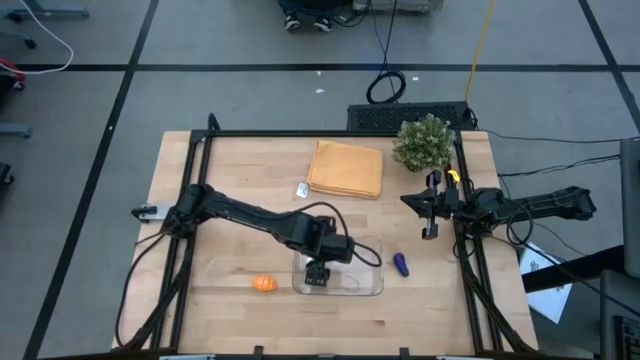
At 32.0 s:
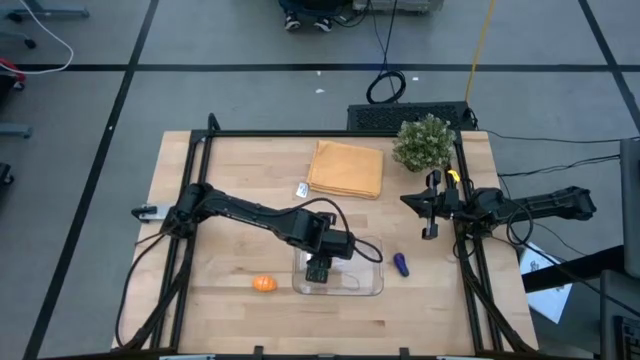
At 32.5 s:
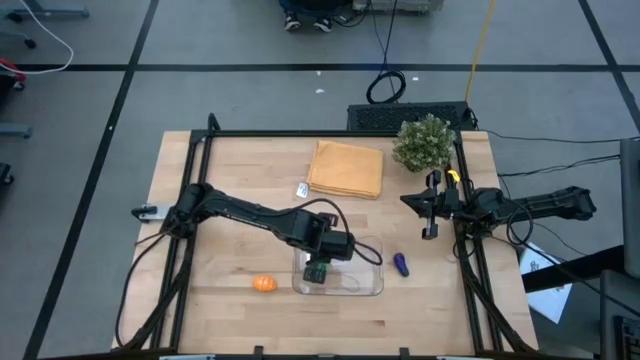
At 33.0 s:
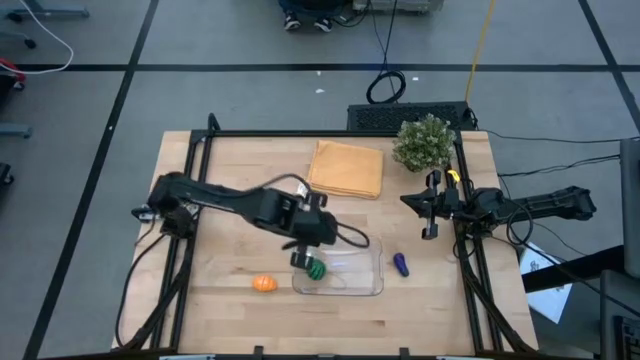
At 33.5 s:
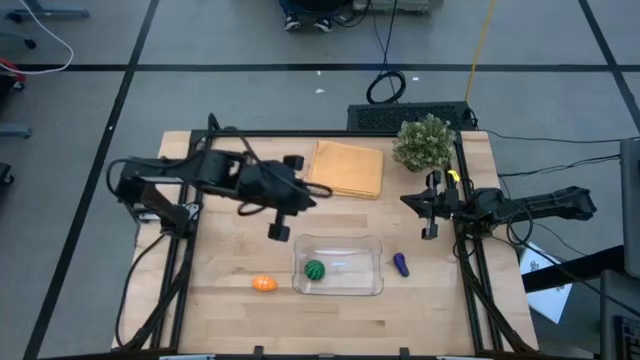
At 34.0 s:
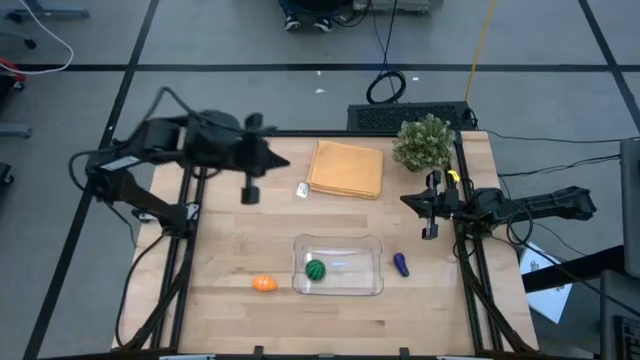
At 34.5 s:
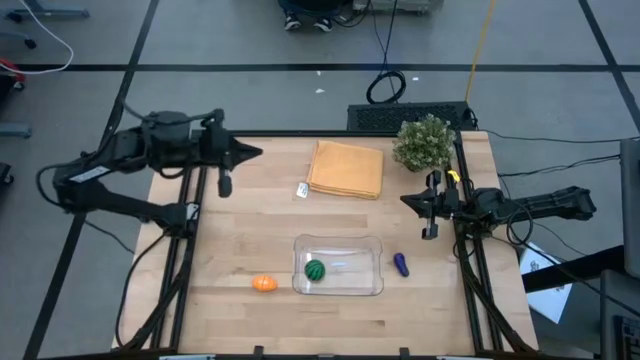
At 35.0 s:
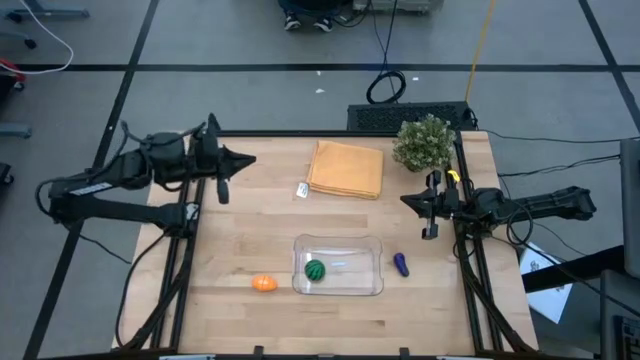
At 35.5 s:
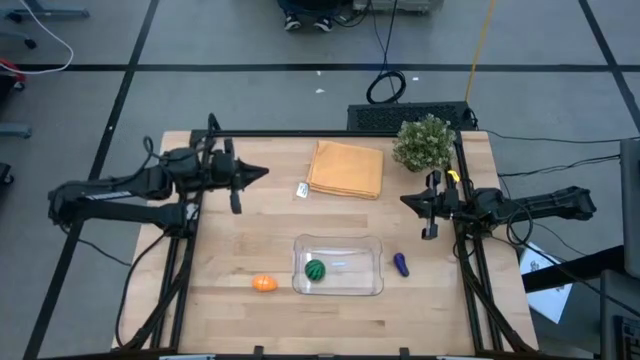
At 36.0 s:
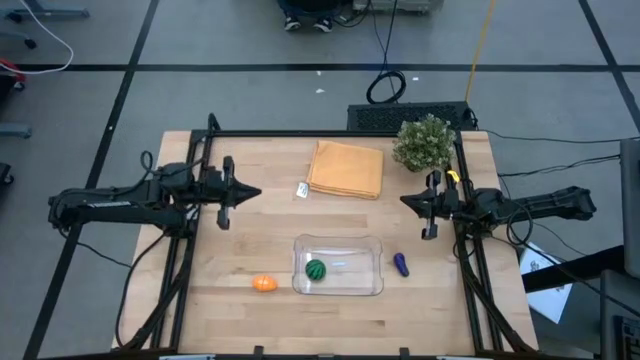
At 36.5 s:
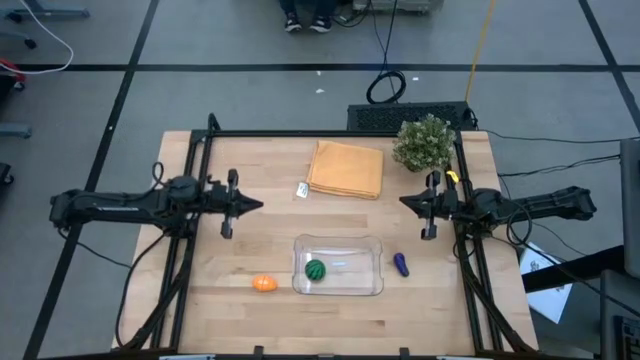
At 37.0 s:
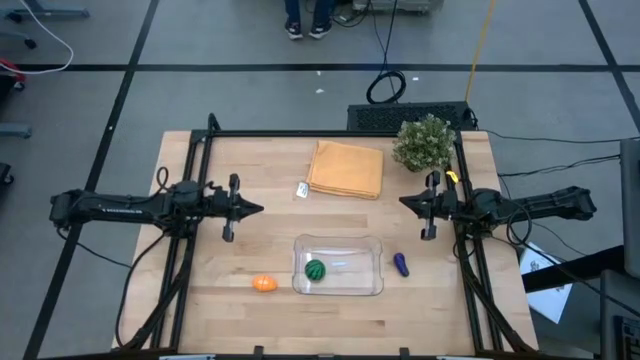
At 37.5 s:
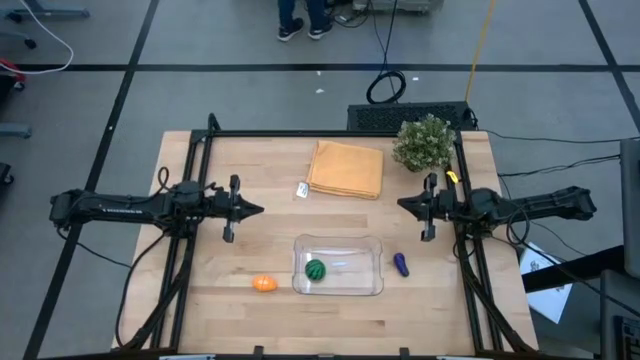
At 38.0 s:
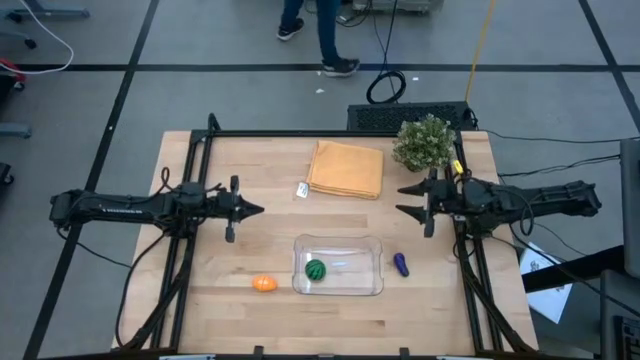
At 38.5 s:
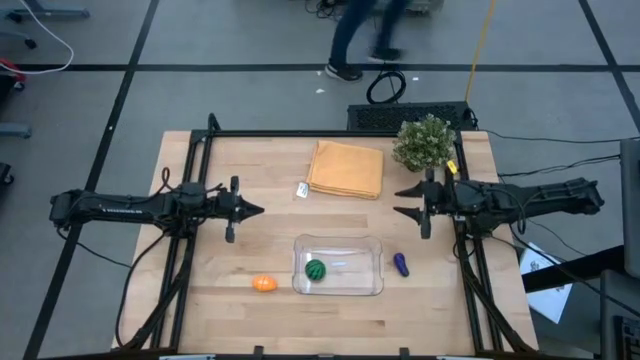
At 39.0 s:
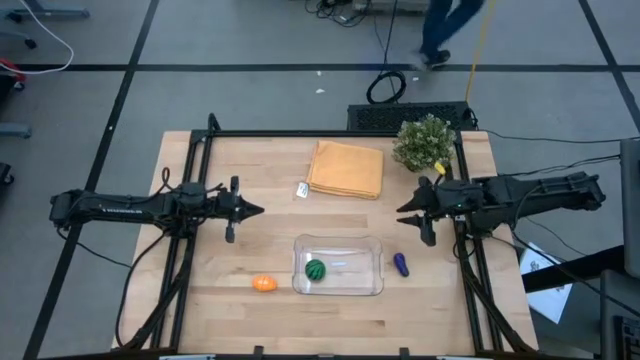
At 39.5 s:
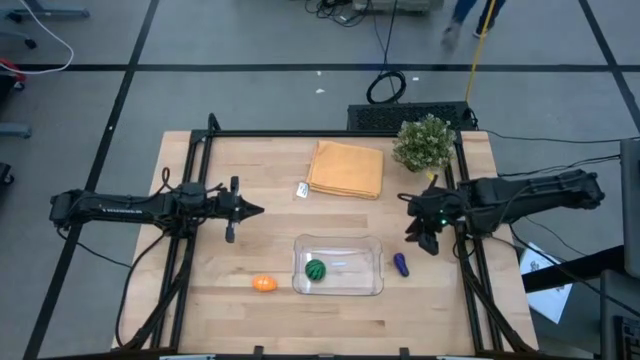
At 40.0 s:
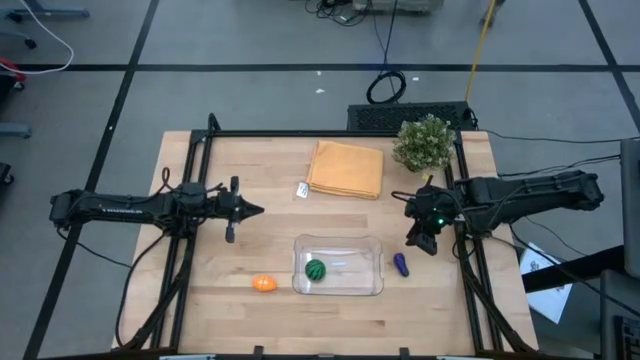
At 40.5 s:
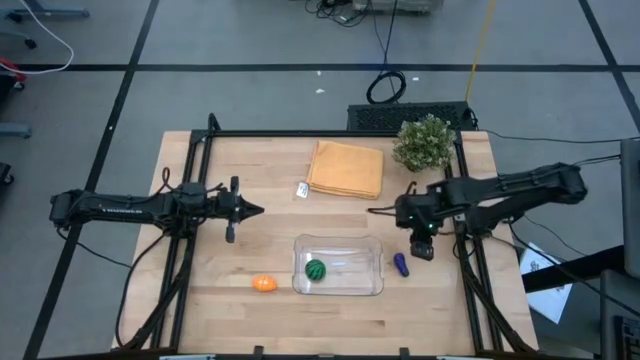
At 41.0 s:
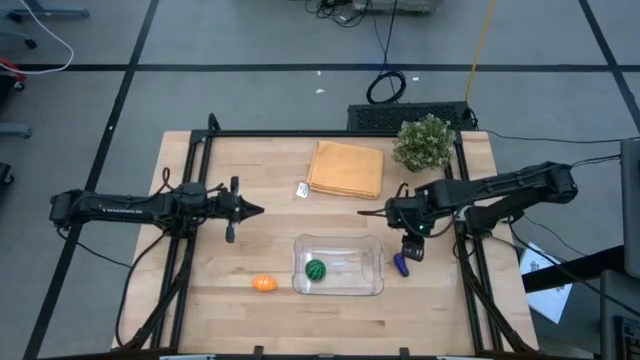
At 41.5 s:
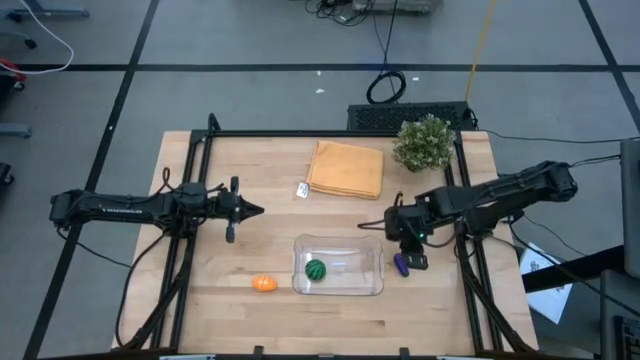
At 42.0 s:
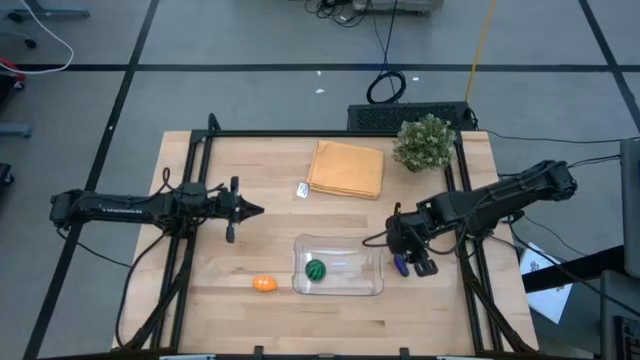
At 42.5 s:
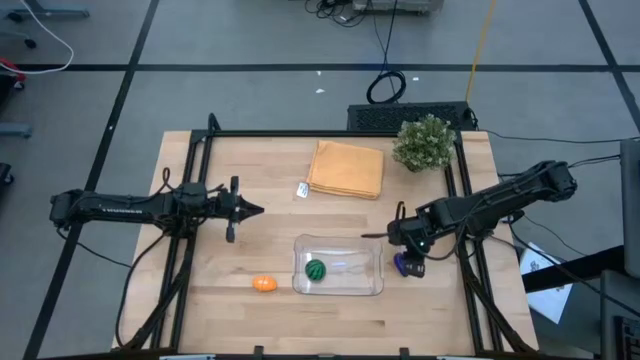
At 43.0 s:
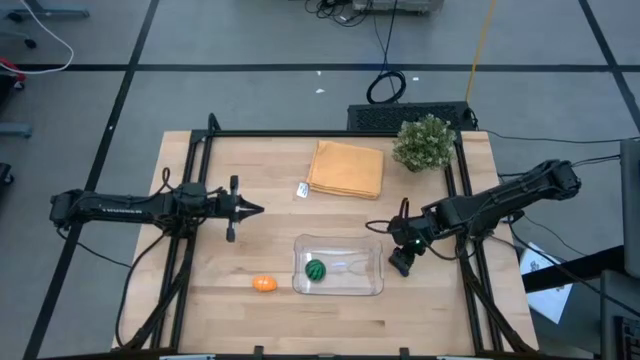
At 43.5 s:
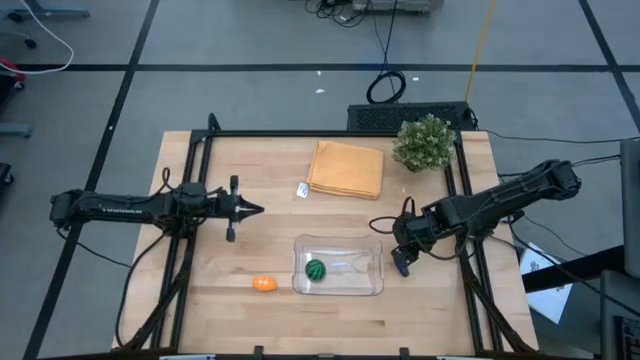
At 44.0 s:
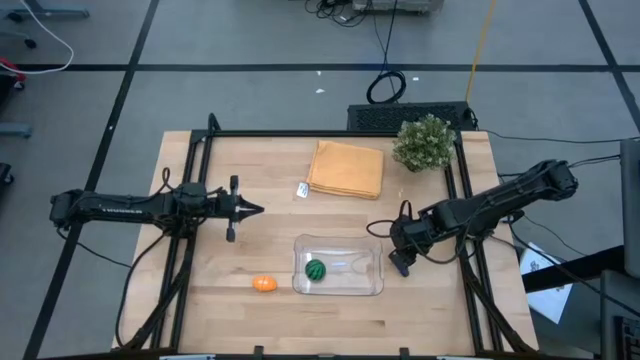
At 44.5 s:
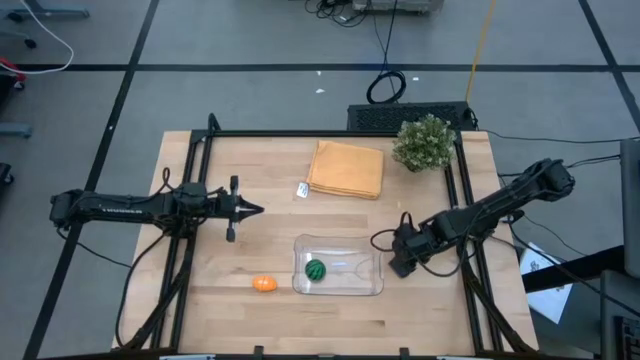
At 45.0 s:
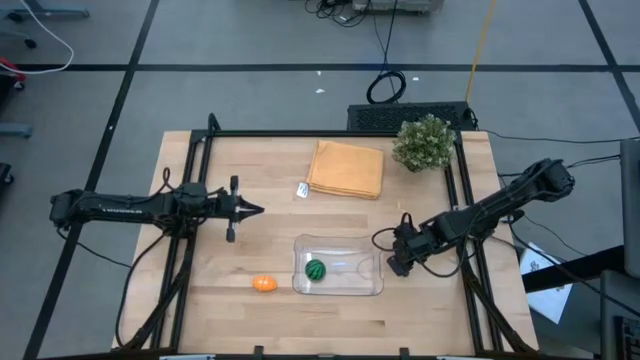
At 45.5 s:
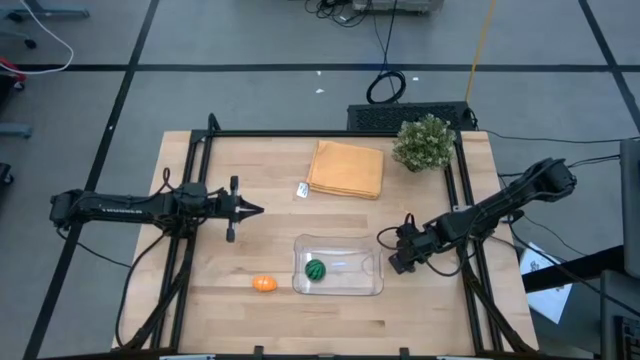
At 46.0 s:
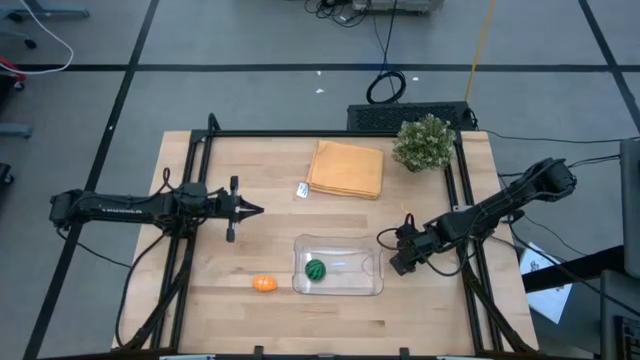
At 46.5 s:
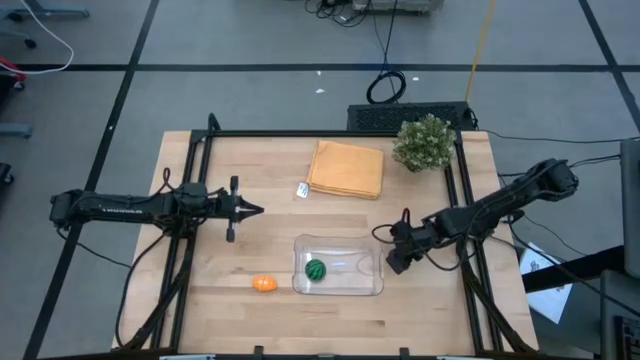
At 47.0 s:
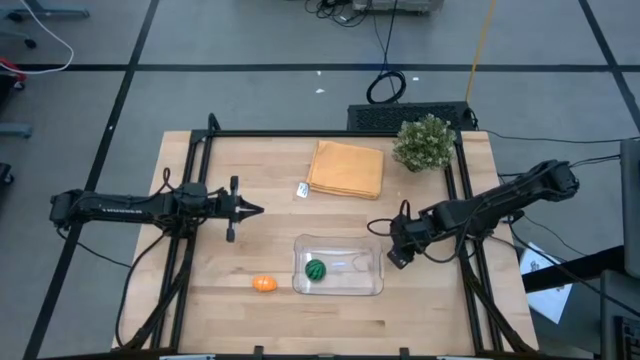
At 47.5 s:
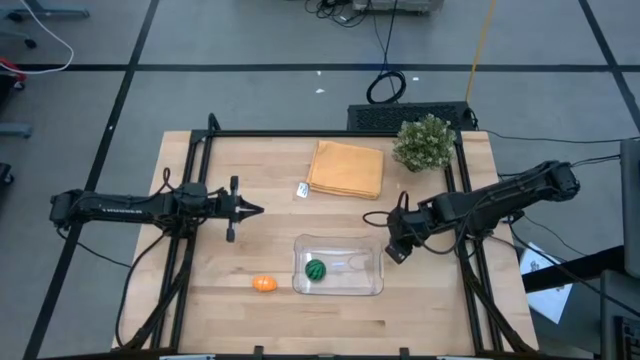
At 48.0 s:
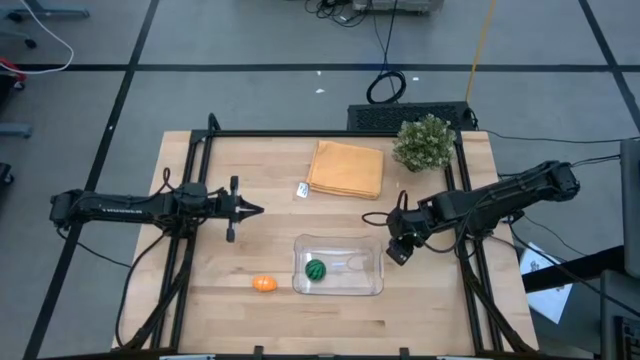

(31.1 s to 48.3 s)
Task: Pick and placing Produce into tupperware
Put the eggplant into the transparent bin

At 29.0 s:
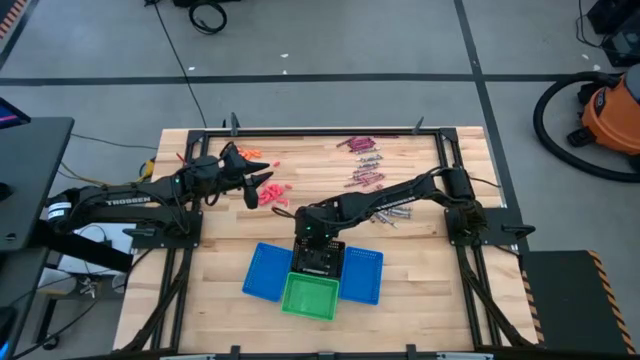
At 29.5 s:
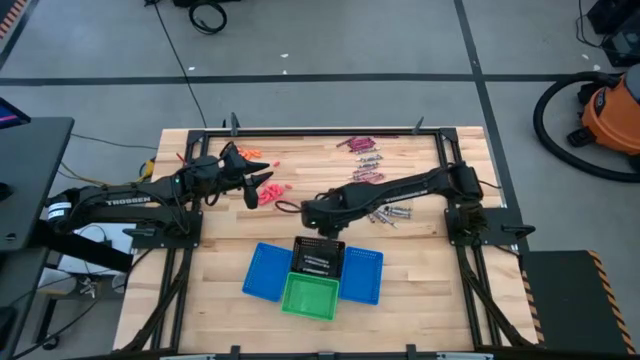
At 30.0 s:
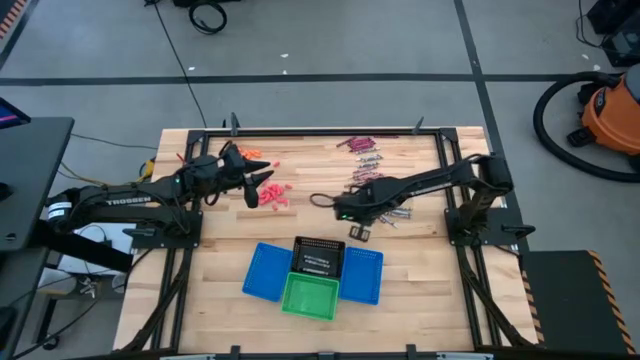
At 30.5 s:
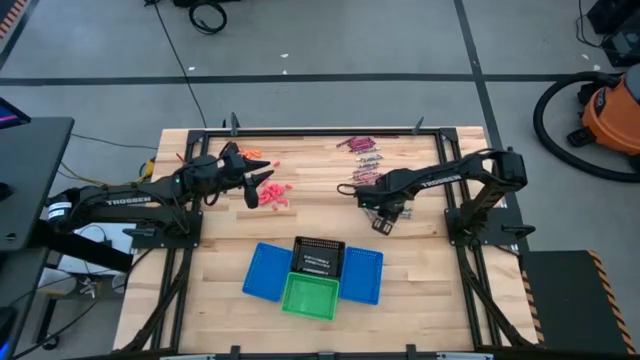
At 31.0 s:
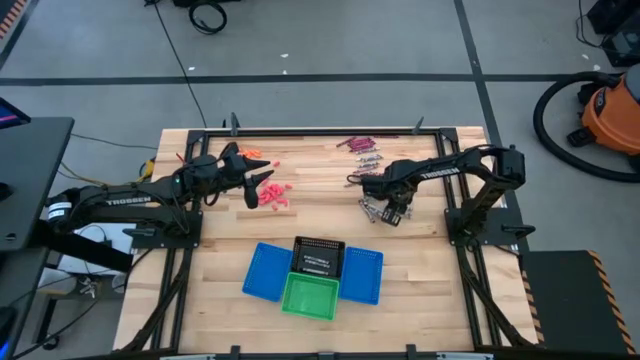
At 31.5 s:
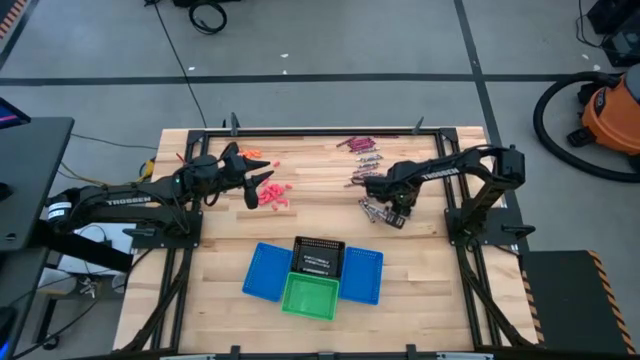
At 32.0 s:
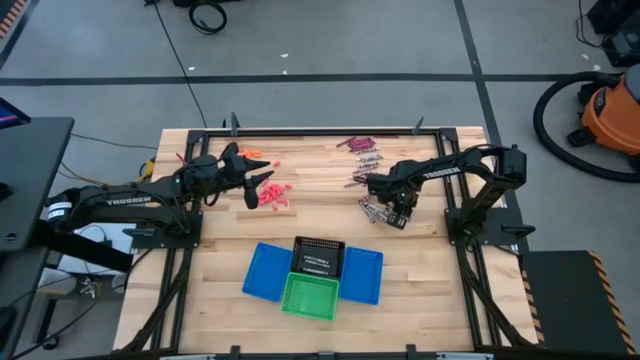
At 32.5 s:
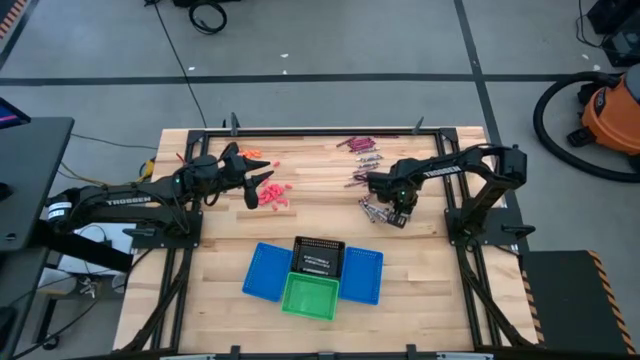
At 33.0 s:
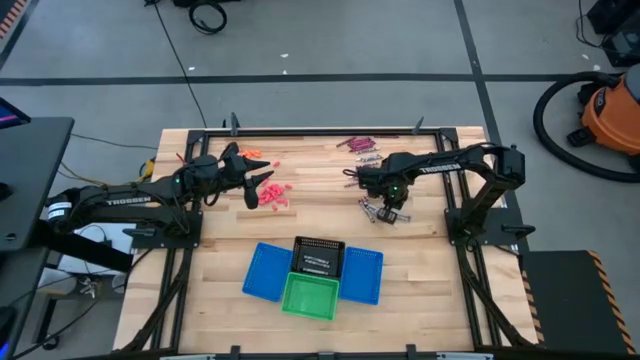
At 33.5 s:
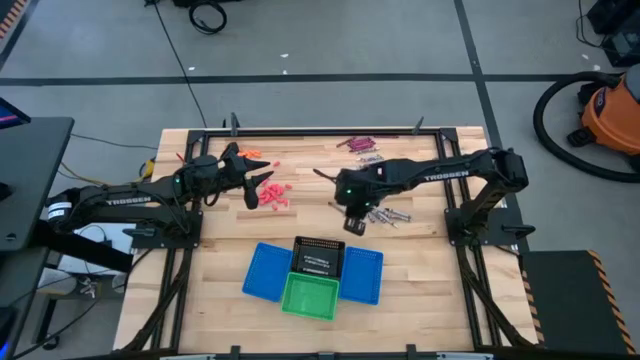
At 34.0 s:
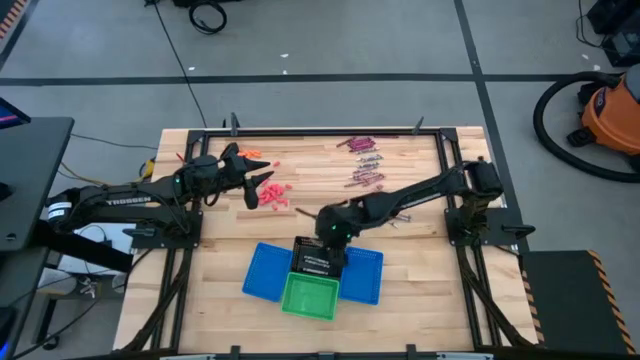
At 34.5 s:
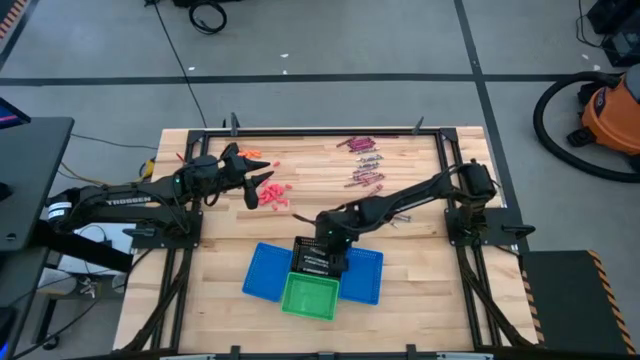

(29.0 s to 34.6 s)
Task: Sort crayons
Put the black crayon into the black bin
